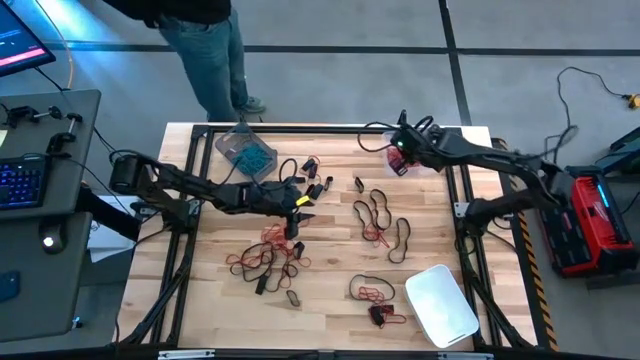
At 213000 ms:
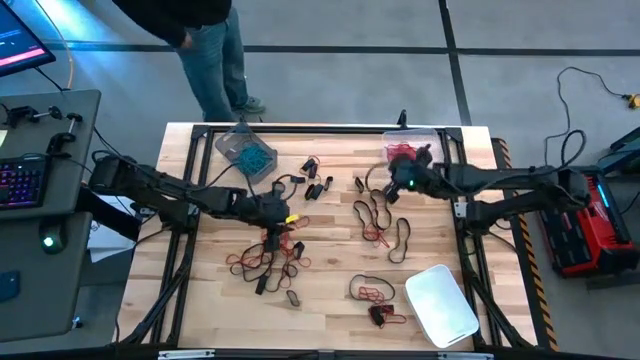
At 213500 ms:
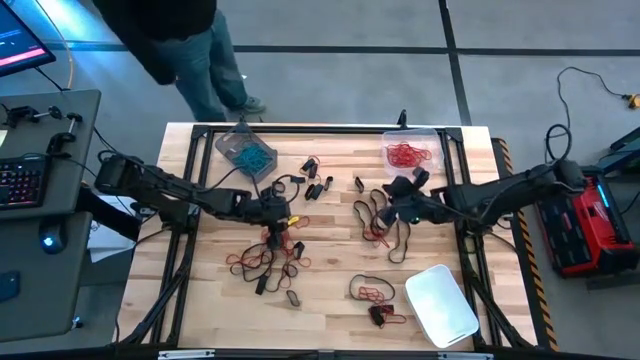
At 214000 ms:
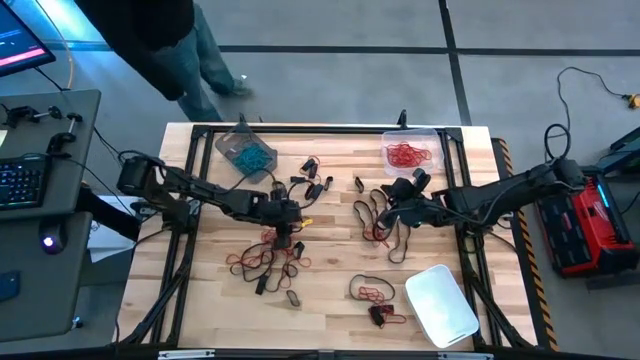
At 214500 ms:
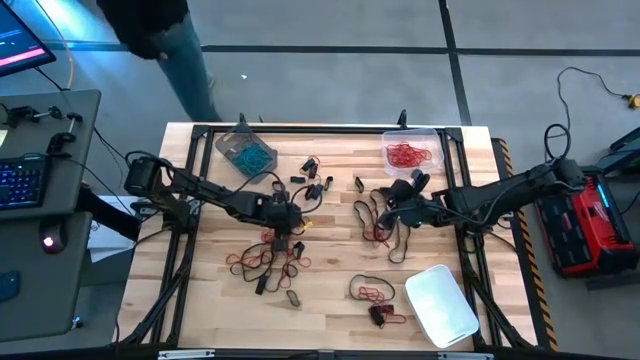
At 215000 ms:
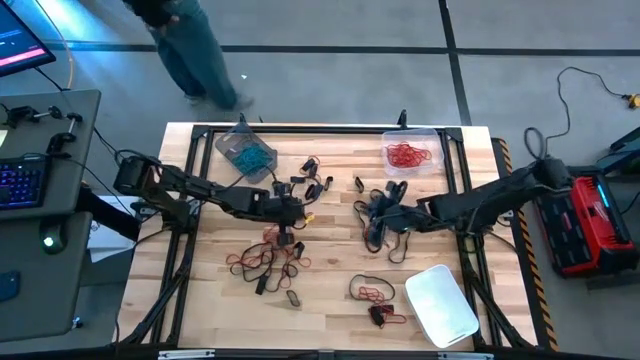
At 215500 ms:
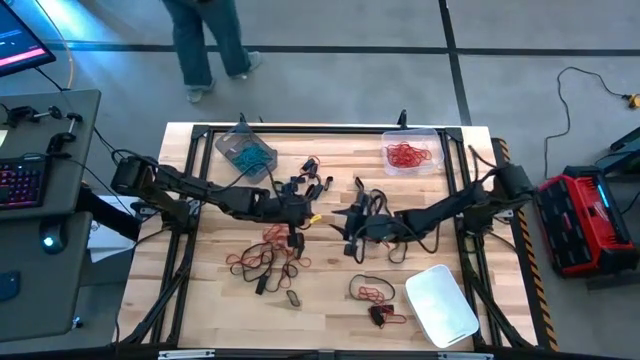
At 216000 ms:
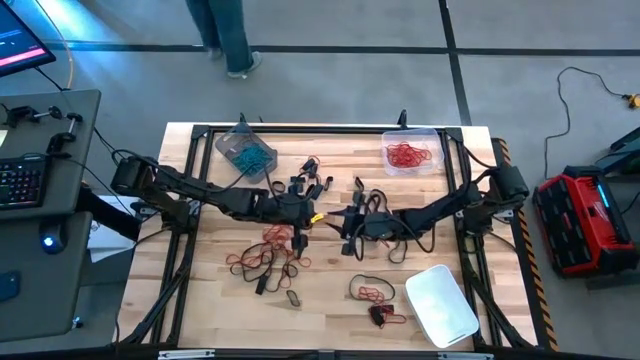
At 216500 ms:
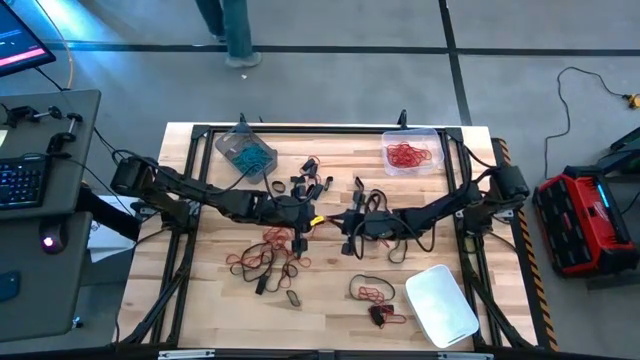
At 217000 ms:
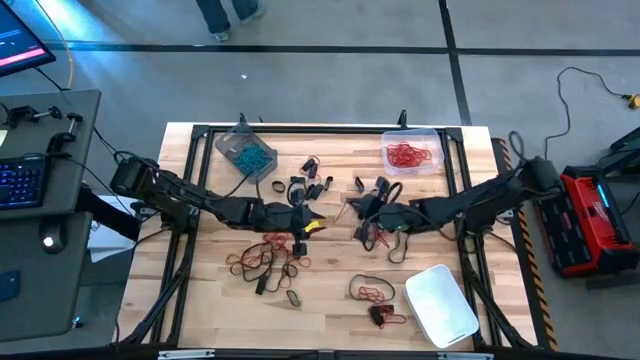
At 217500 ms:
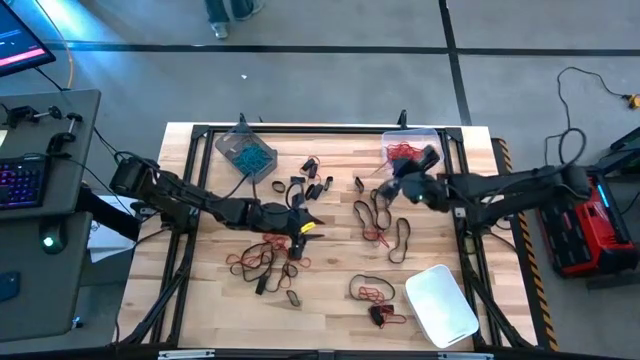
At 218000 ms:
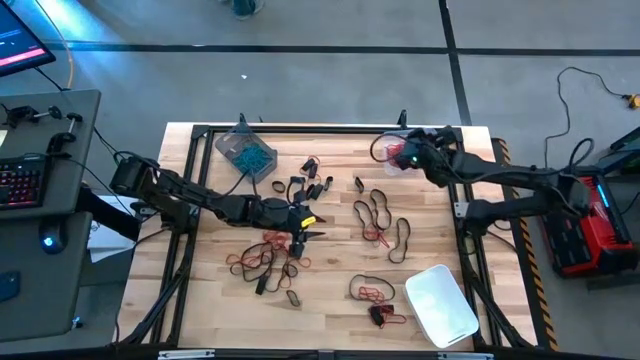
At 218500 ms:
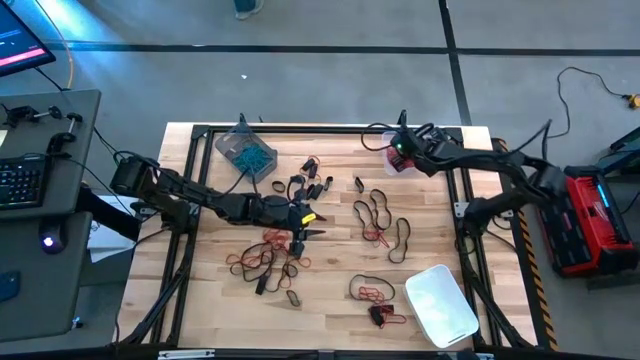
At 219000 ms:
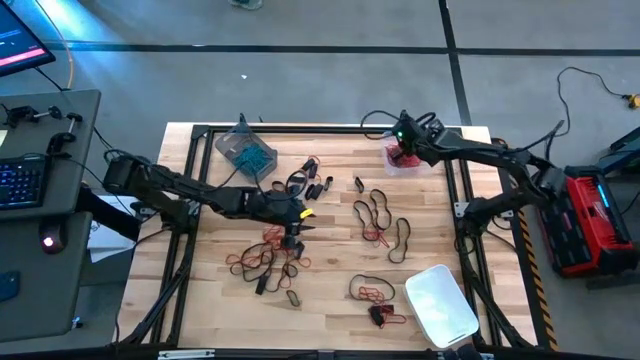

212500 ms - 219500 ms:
Task: Sort rubber bands into baskets
Put the red rubber band into the transparent bin

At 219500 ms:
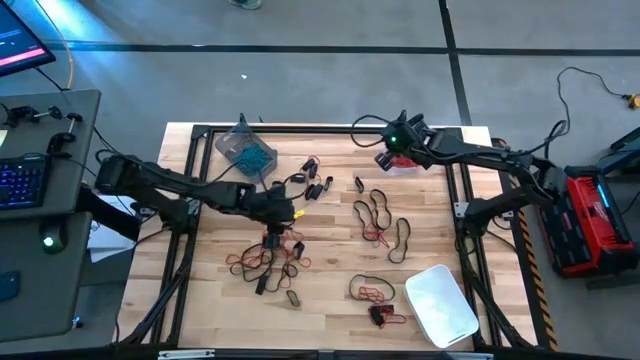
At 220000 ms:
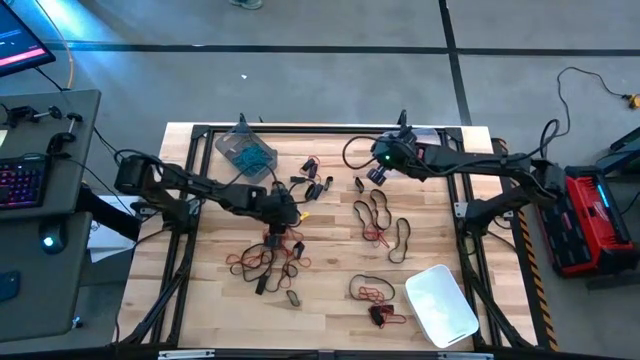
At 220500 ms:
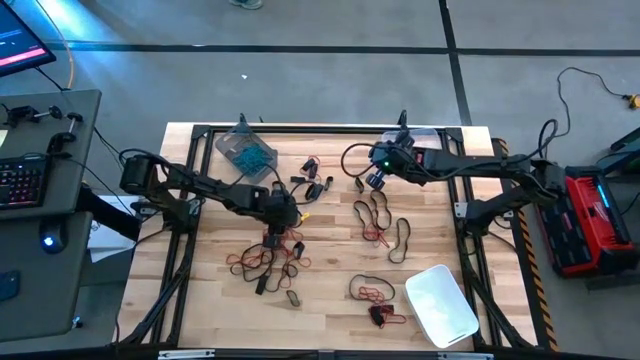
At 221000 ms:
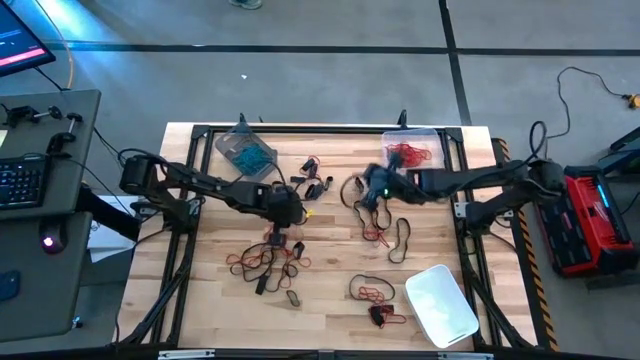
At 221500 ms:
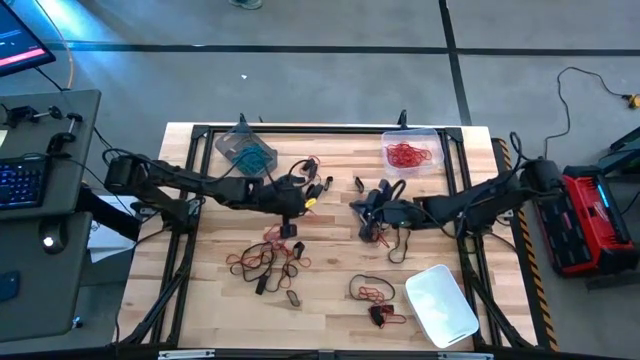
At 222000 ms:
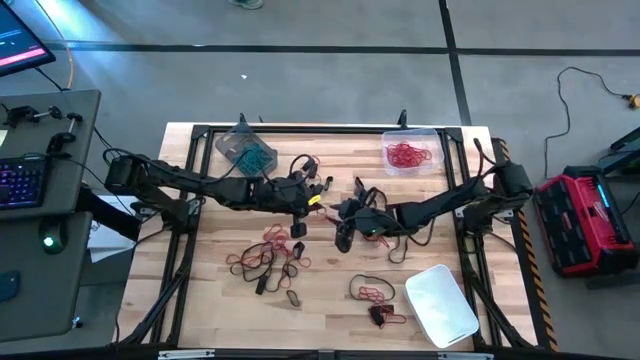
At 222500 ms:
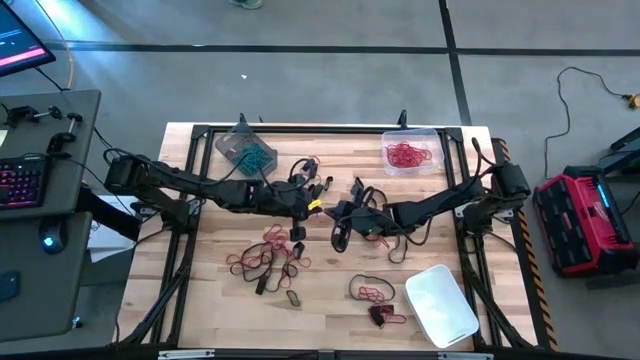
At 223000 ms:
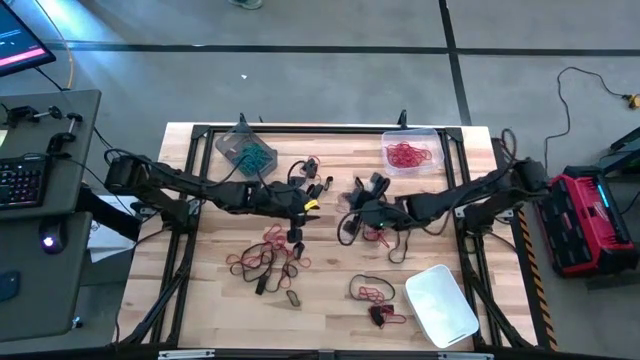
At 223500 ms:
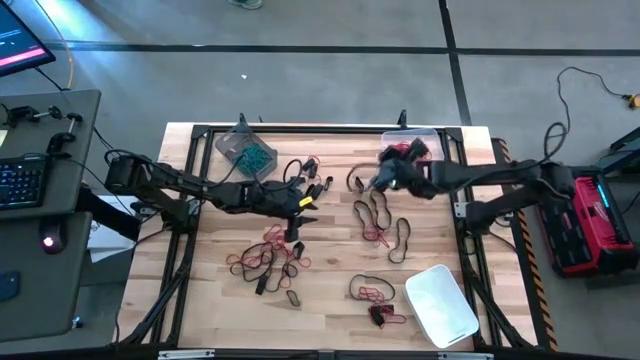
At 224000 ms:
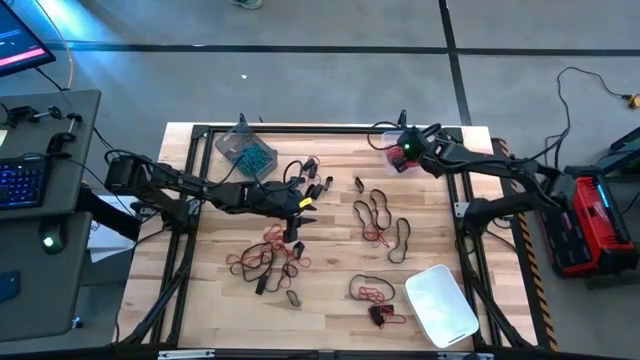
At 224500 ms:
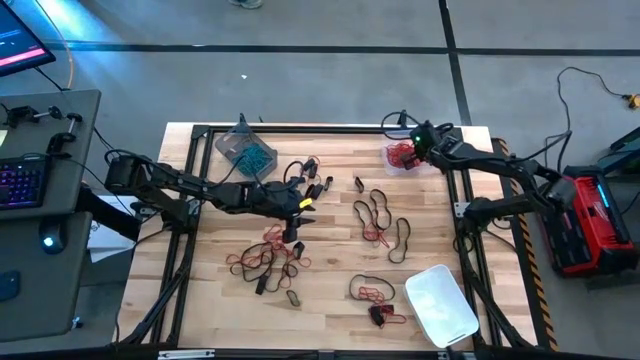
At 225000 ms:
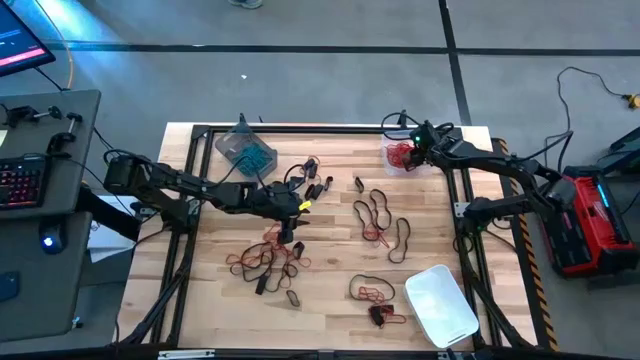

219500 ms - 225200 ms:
Put the red rubber band into the transparent bin

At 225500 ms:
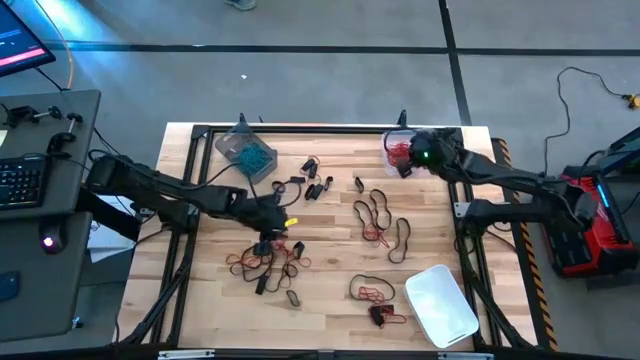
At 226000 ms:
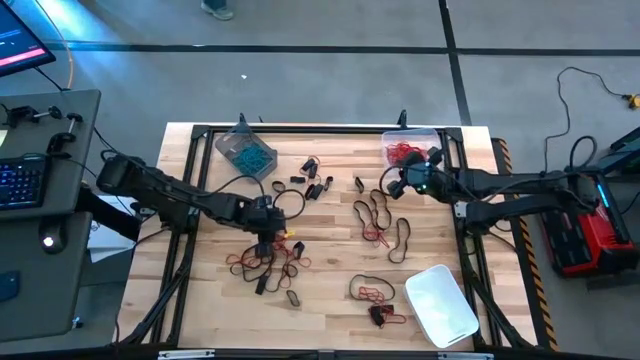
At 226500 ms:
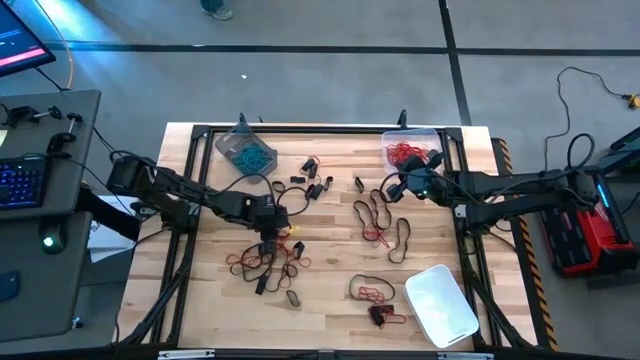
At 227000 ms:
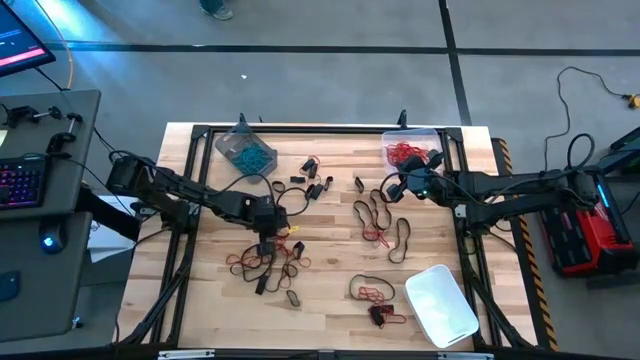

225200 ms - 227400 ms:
Put the red rubber band into the transparent bin

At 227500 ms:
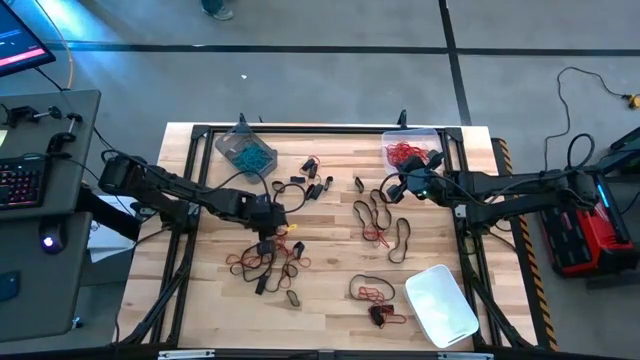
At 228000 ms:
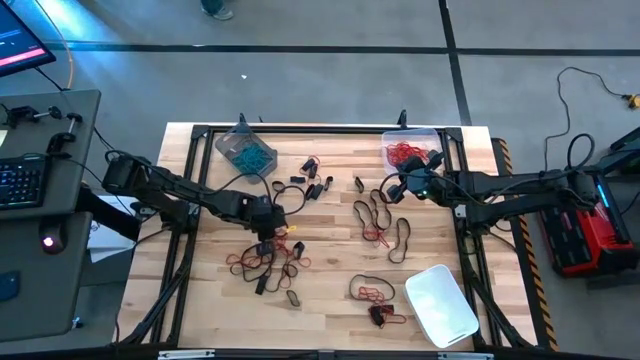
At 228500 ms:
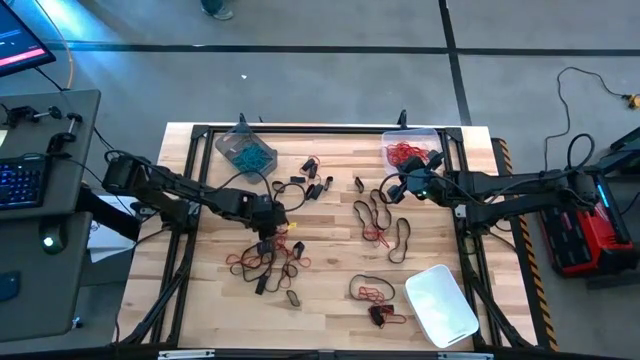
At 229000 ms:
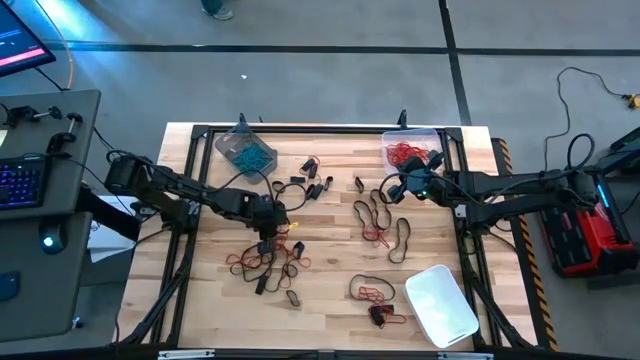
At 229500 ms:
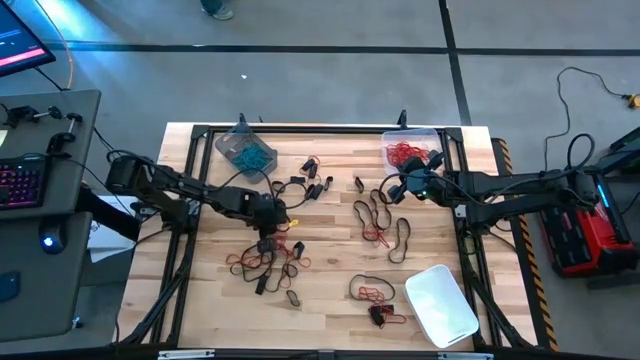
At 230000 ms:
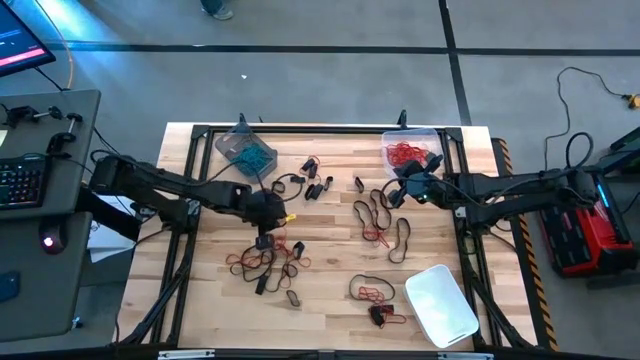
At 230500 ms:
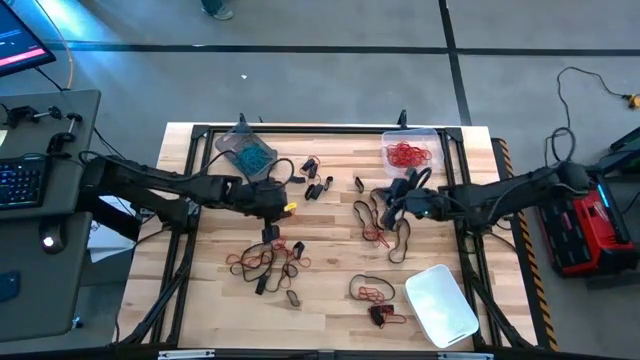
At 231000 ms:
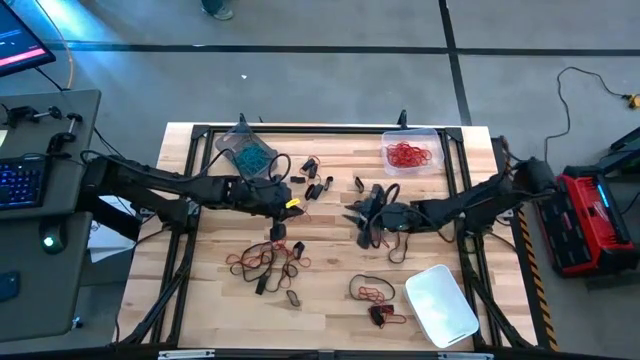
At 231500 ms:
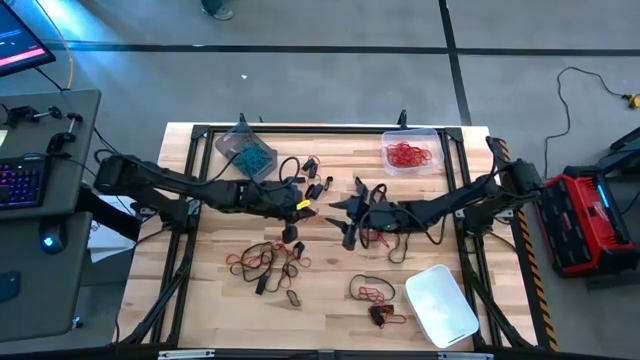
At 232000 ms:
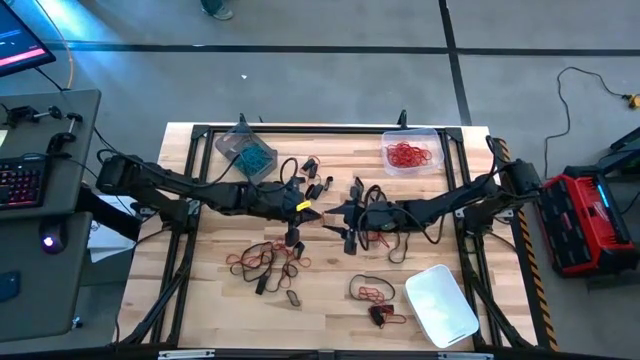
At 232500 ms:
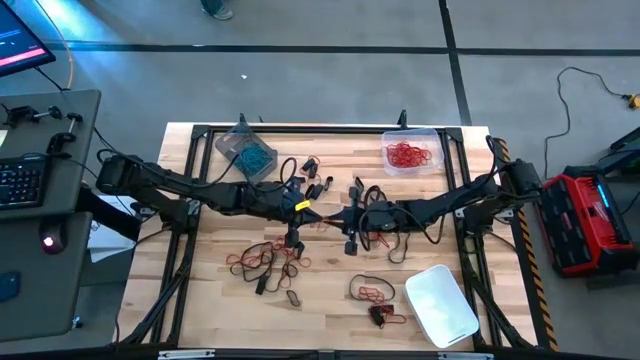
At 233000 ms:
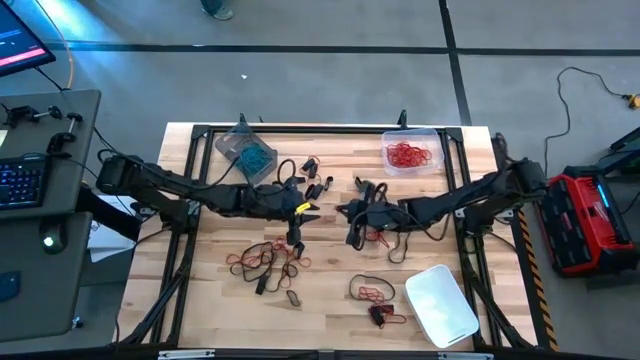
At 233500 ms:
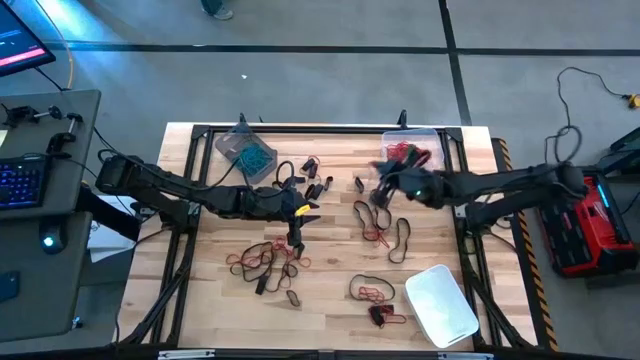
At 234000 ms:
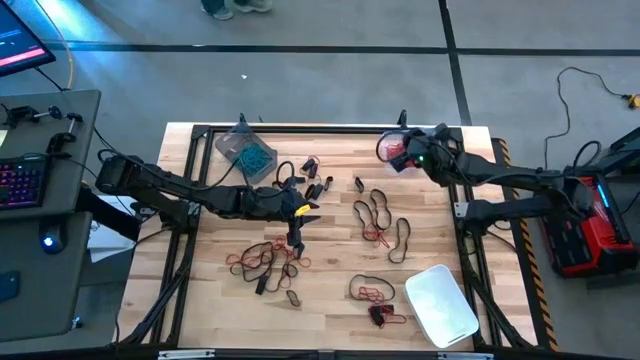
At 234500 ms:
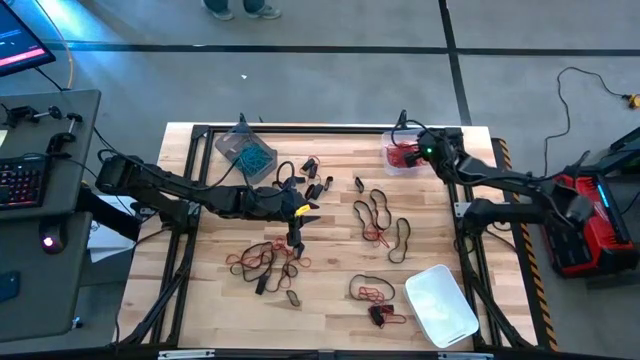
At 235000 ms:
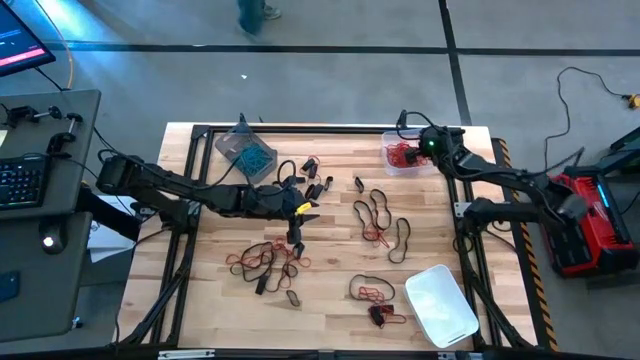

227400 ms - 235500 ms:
Put the red rubber band into the transparent bin
